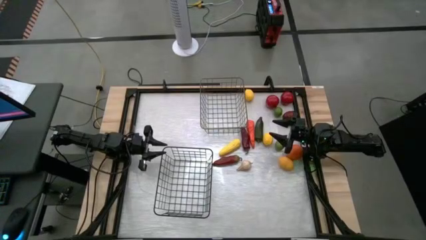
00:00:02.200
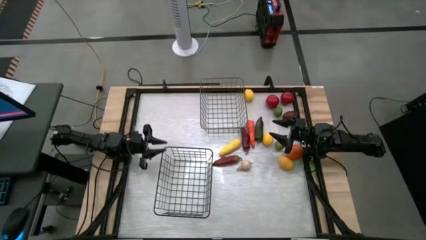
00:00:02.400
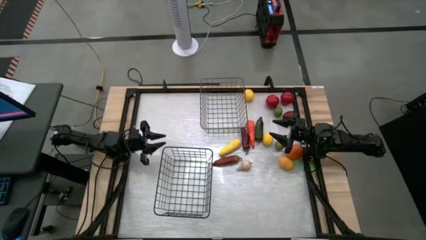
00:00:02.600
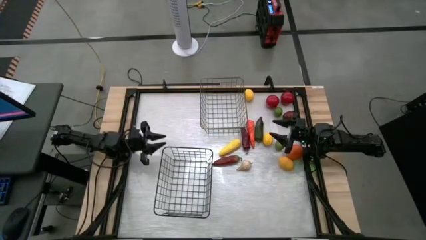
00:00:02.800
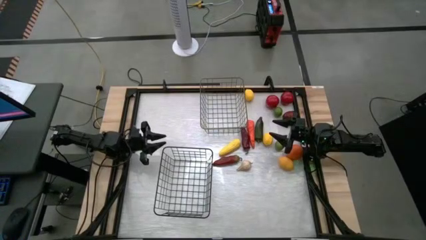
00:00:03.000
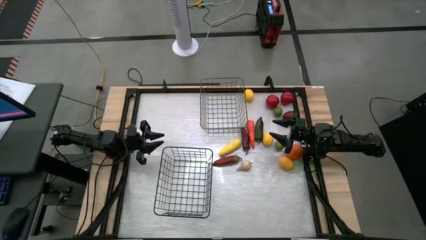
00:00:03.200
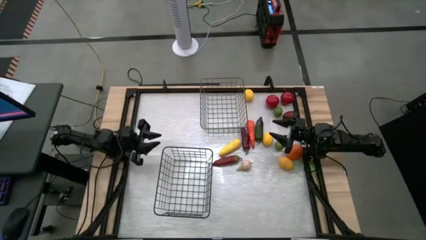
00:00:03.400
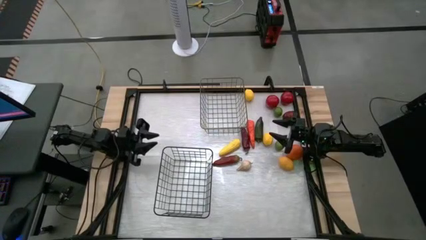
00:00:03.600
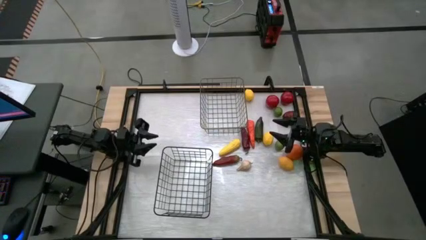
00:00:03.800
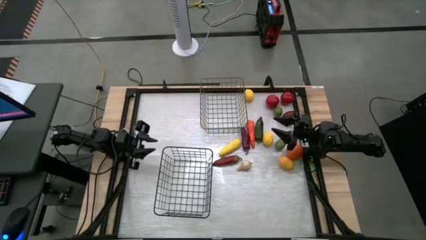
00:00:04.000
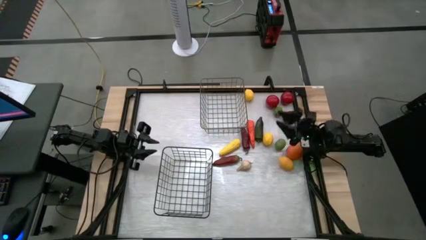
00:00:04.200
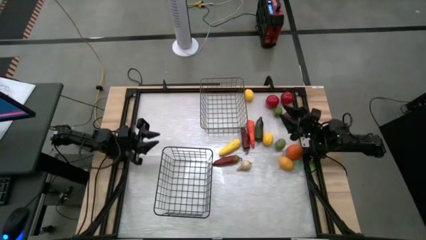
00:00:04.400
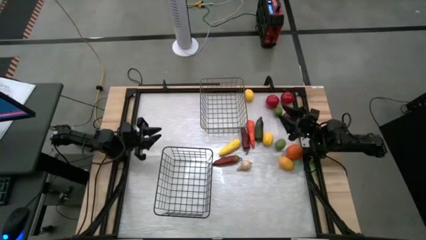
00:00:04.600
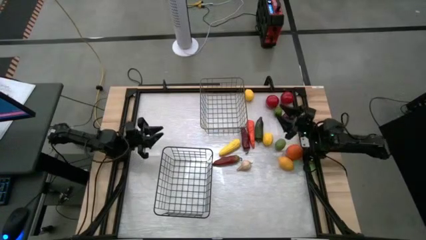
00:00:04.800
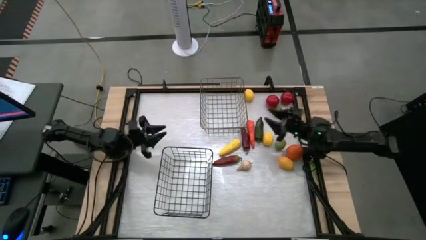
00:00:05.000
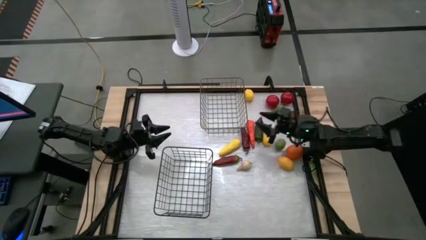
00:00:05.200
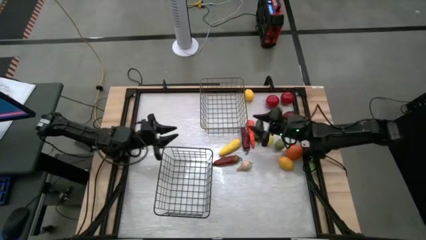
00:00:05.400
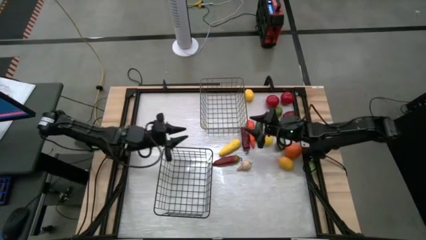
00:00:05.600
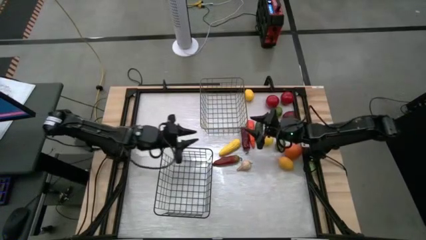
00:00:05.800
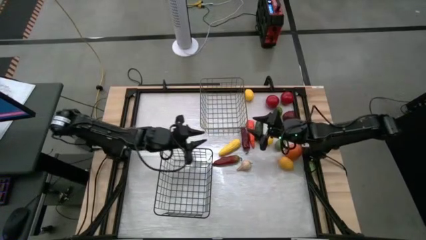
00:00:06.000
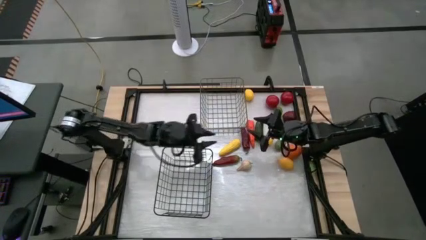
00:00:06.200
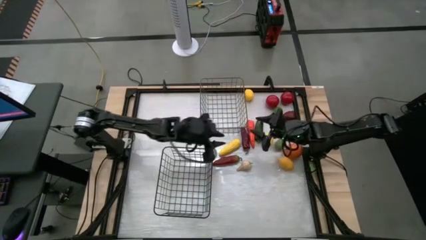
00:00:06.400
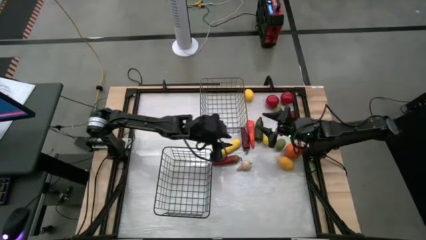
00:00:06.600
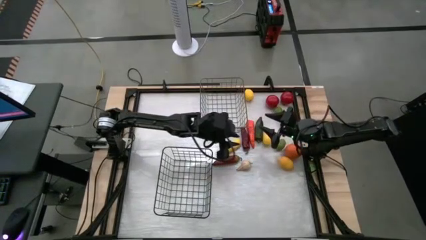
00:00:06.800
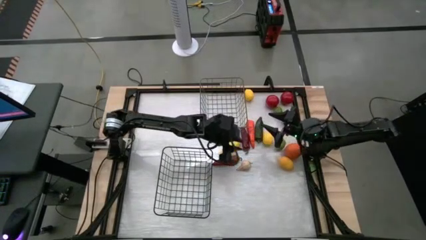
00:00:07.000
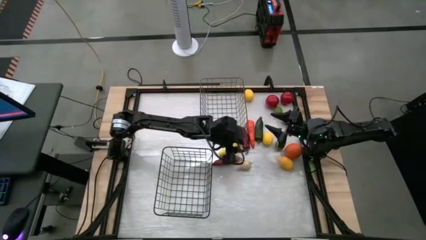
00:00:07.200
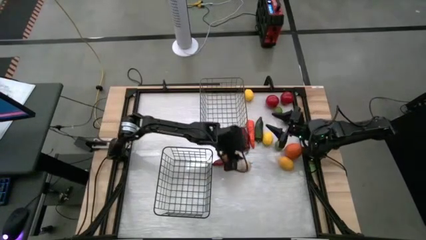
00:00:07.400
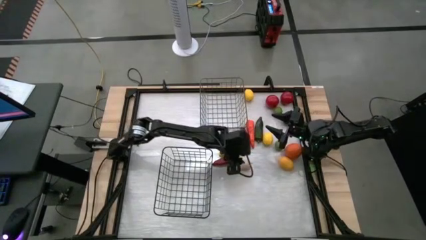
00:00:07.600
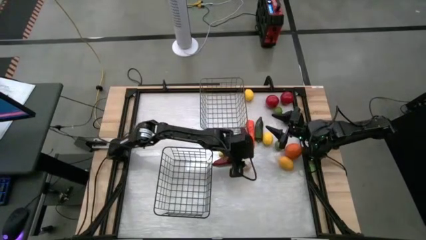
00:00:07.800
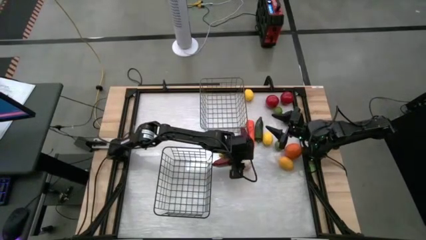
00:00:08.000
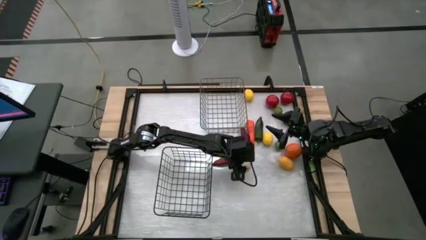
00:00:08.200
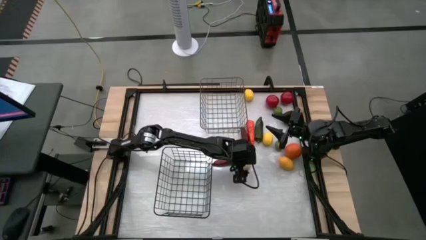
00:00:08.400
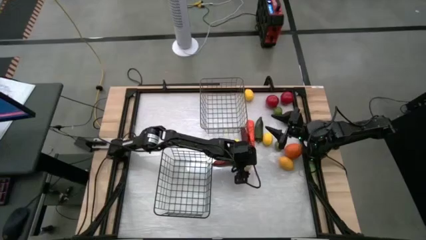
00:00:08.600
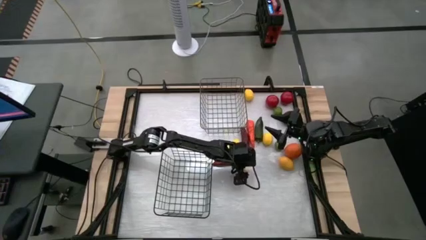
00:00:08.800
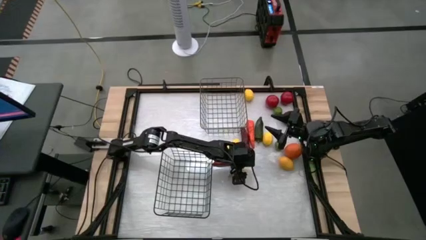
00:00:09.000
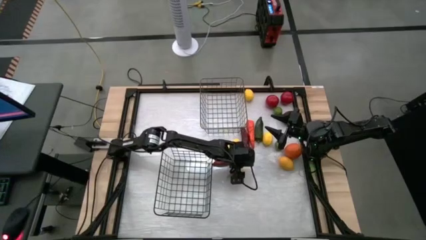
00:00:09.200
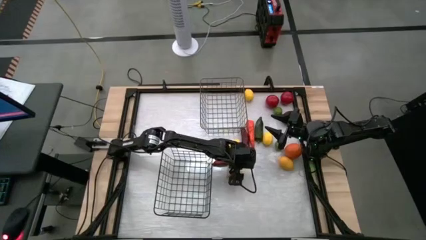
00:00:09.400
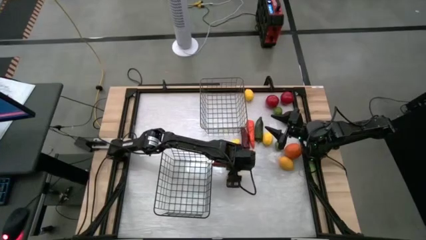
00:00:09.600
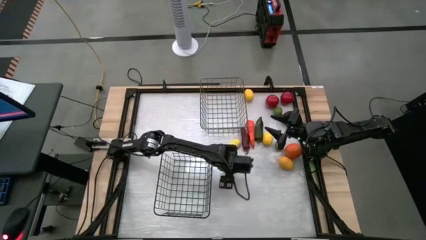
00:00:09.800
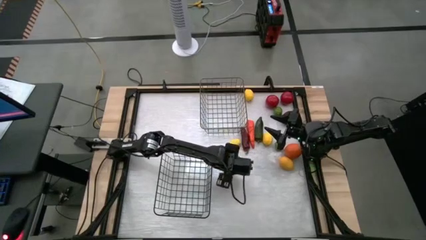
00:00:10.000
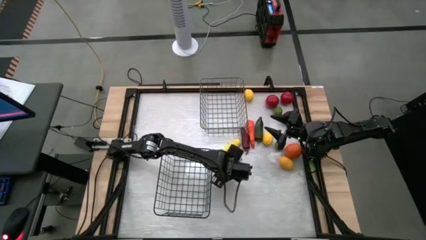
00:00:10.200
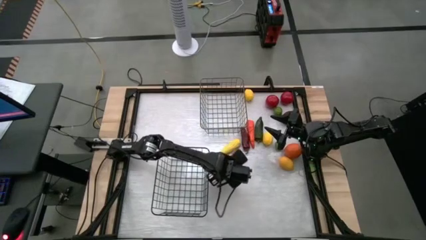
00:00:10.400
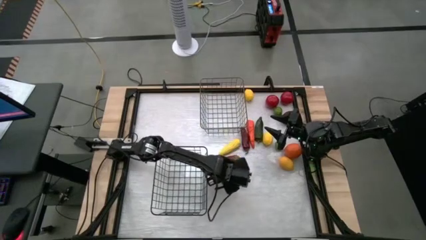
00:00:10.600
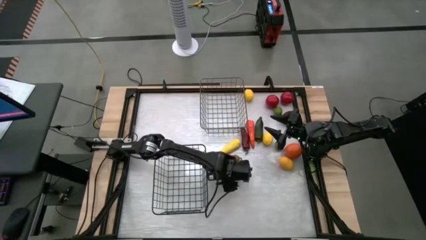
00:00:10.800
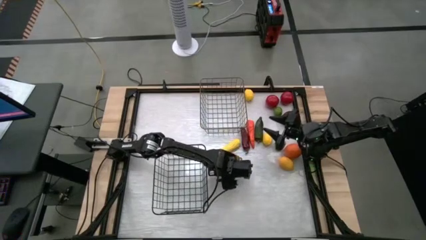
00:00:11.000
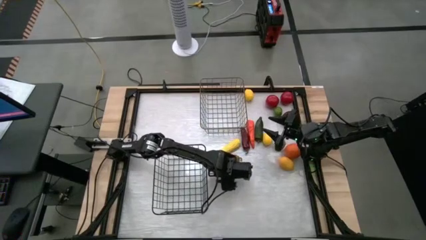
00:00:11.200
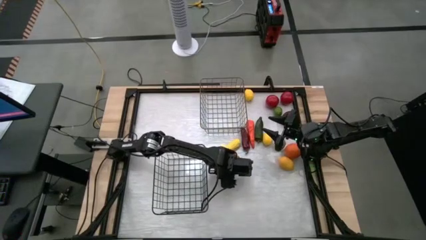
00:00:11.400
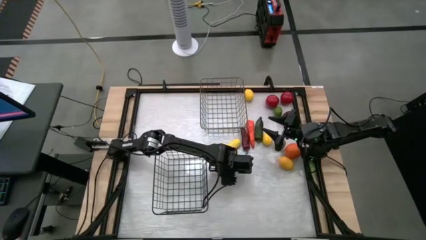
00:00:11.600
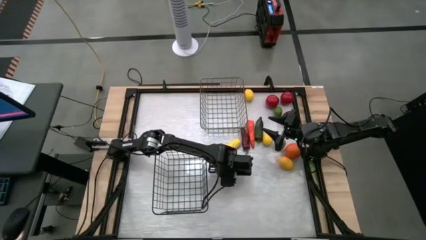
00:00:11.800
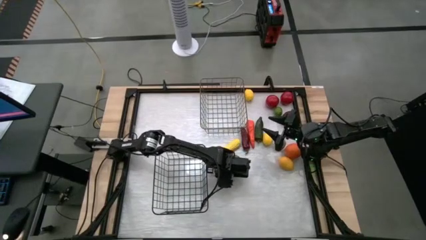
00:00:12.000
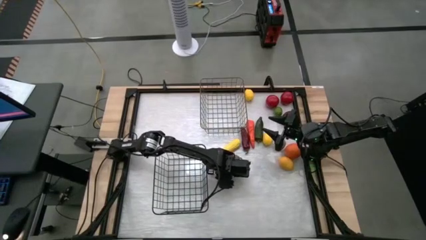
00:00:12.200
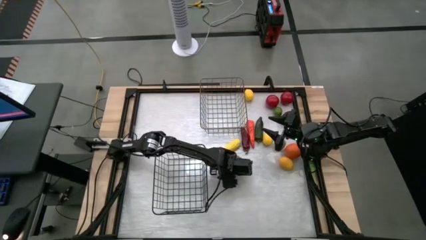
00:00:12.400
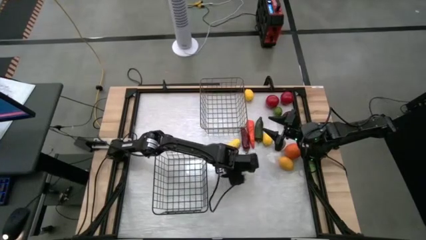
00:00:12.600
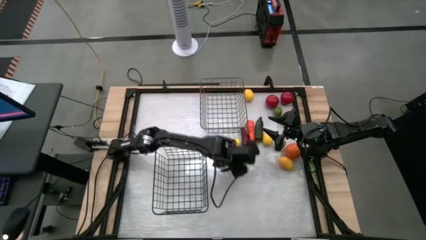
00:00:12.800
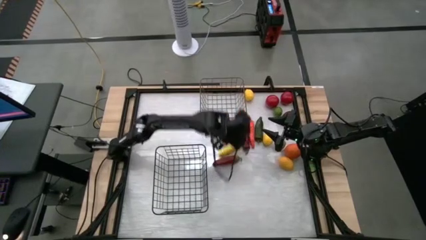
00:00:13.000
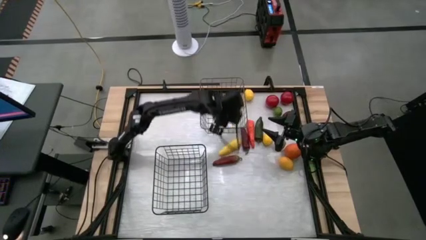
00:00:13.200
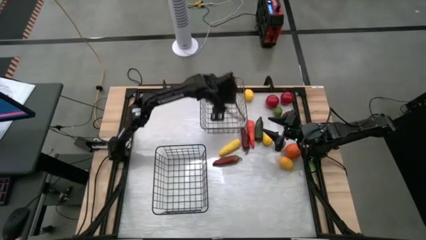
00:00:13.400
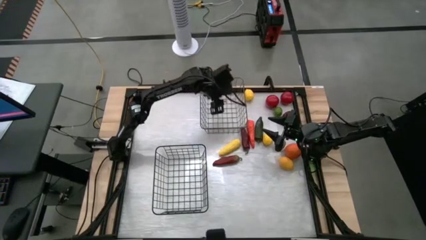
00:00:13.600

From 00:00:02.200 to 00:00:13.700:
Task: Sort produce into baskets
Put the garlic into the gold wire basket

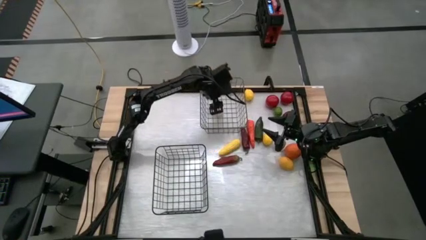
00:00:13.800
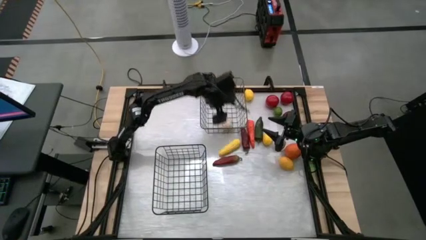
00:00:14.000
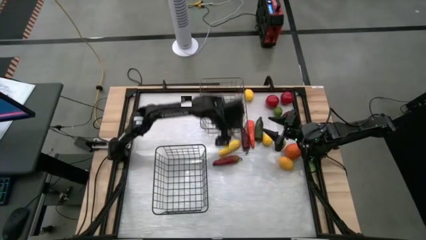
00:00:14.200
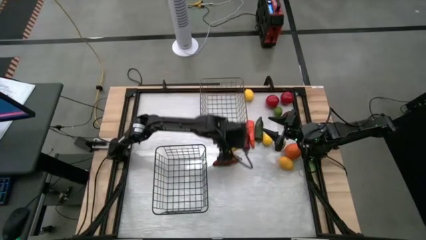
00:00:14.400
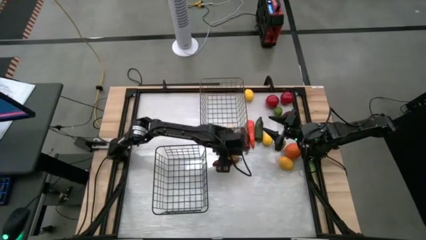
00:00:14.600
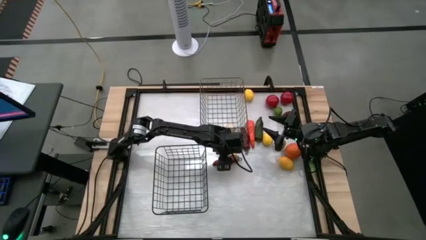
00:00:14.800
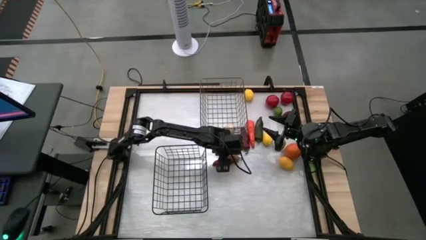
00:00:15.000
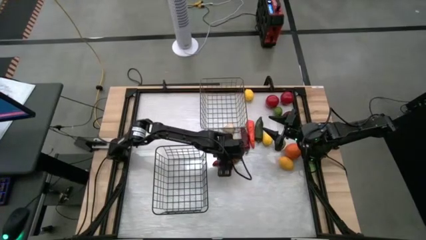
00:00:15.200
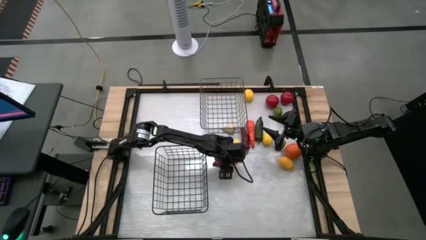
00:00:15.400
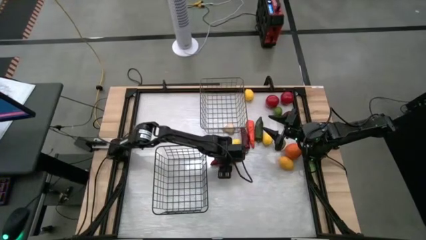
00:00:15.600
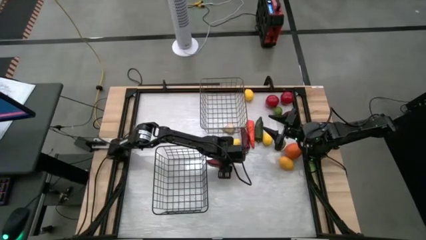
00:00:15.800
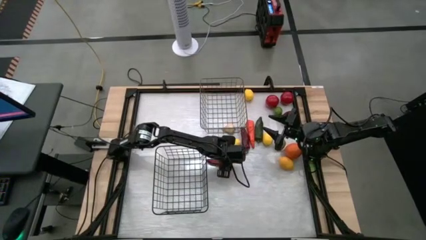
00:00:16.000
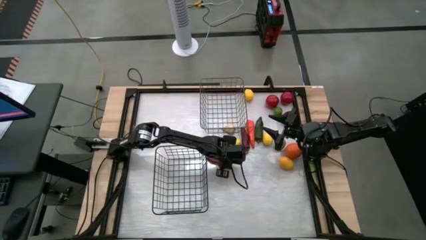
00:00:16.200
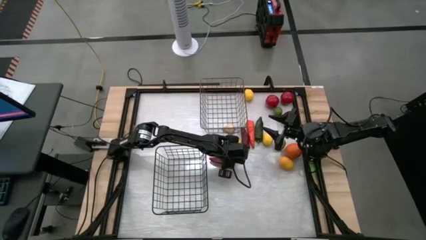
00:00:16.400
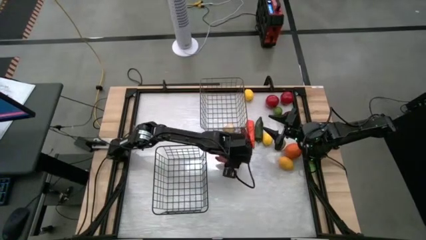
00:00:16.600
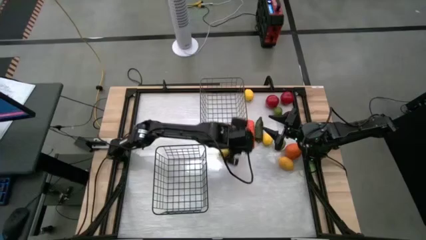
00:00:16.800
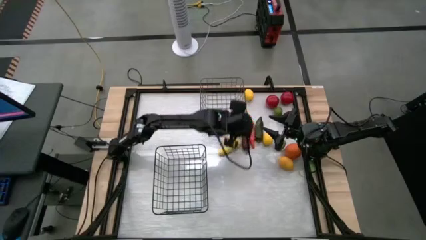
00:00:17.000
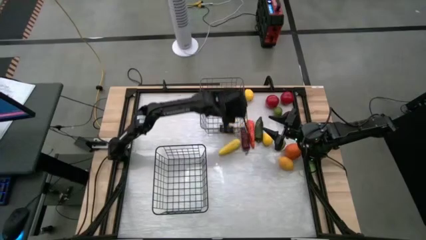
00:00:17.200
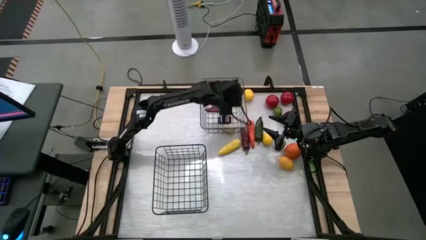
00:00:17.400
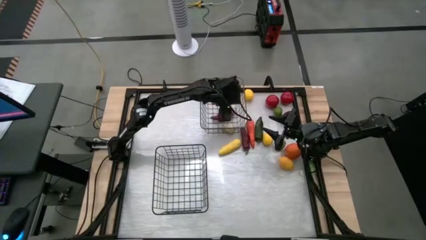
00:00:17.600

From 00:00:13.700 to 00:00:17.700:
Put the bottom red chili pepper into the gold wire basket
